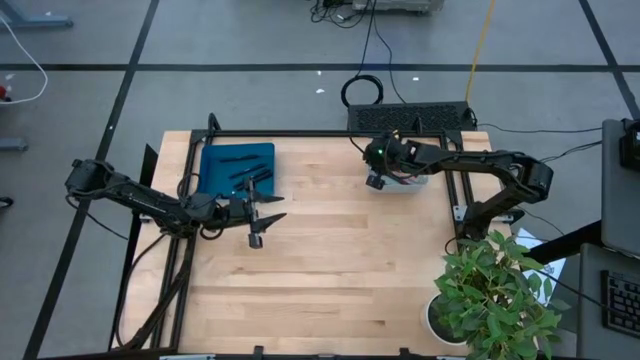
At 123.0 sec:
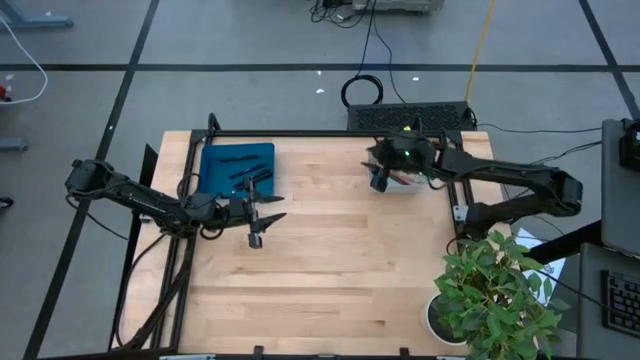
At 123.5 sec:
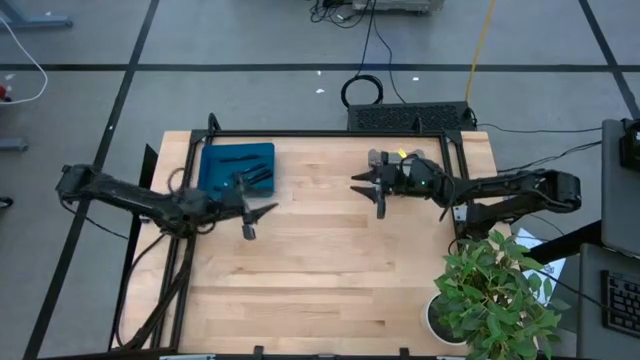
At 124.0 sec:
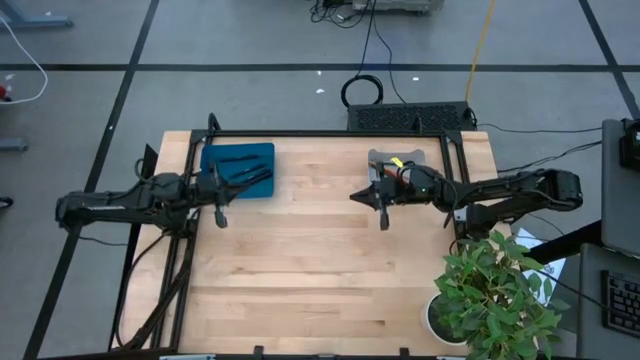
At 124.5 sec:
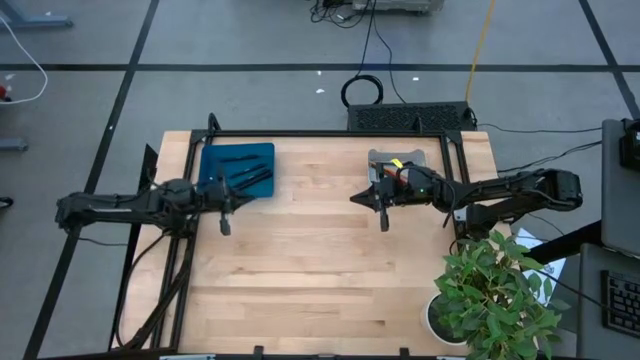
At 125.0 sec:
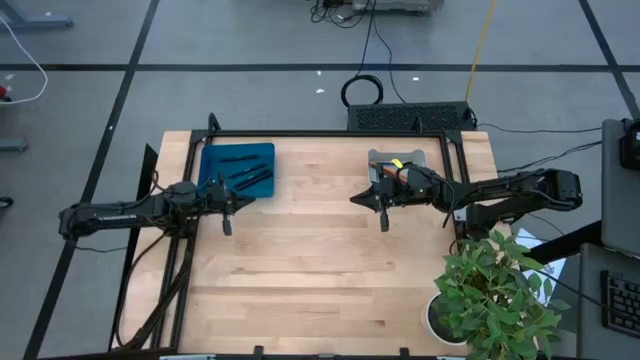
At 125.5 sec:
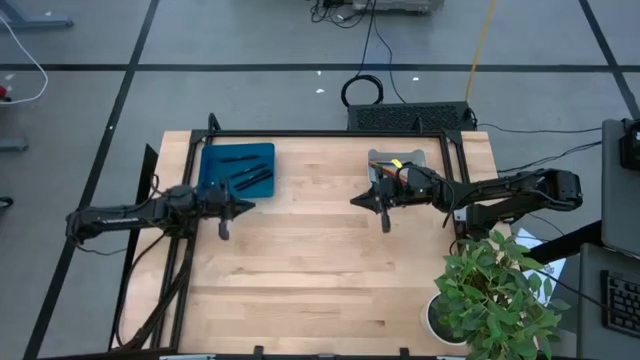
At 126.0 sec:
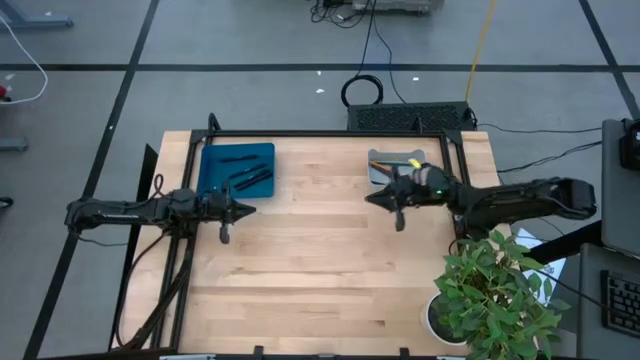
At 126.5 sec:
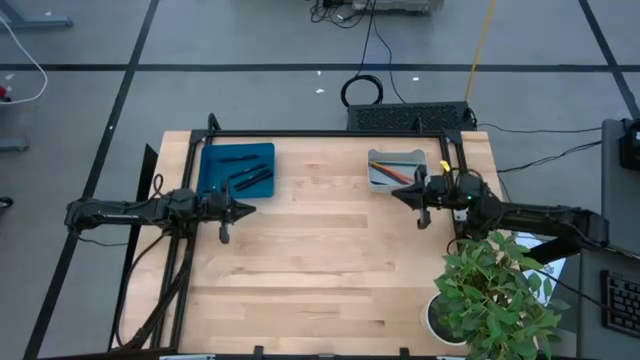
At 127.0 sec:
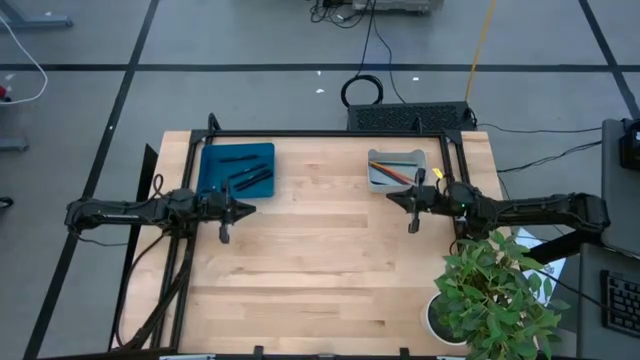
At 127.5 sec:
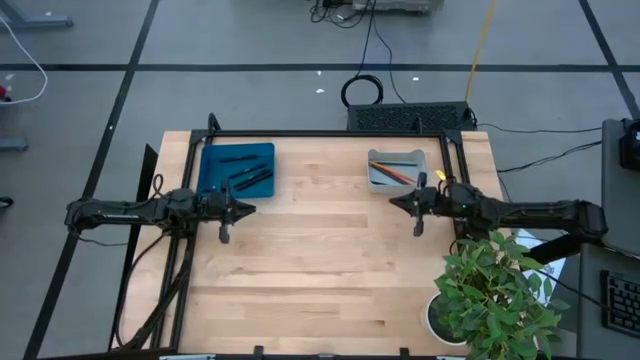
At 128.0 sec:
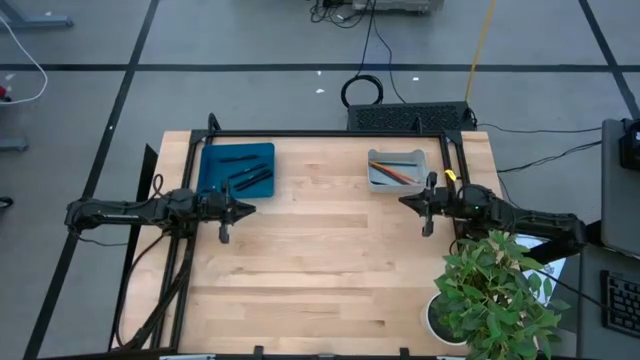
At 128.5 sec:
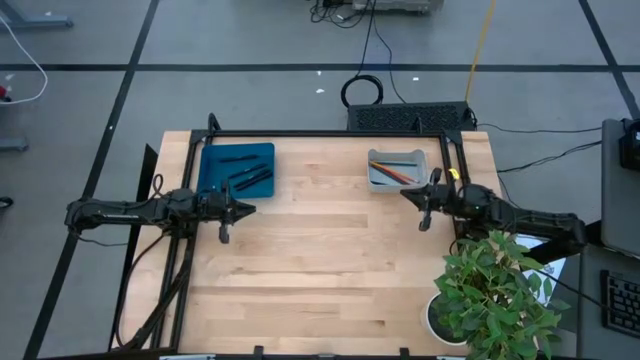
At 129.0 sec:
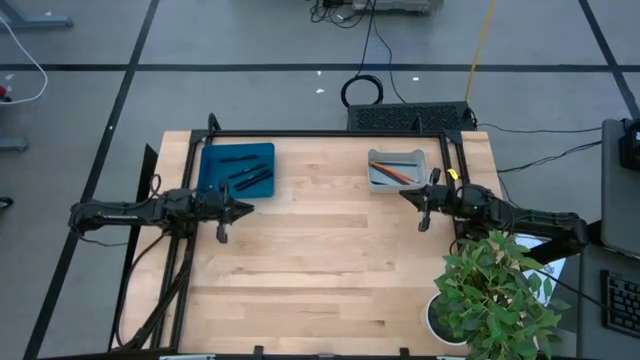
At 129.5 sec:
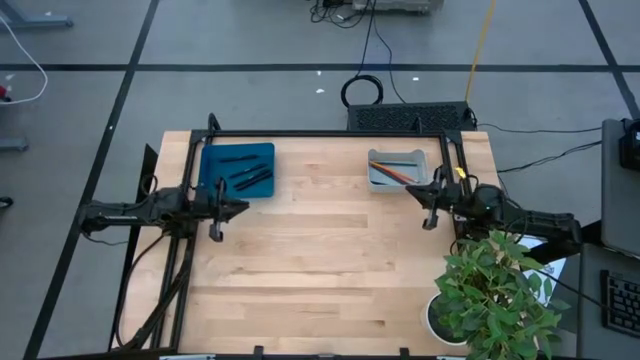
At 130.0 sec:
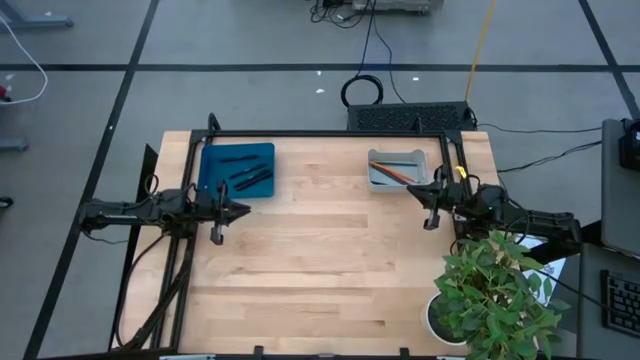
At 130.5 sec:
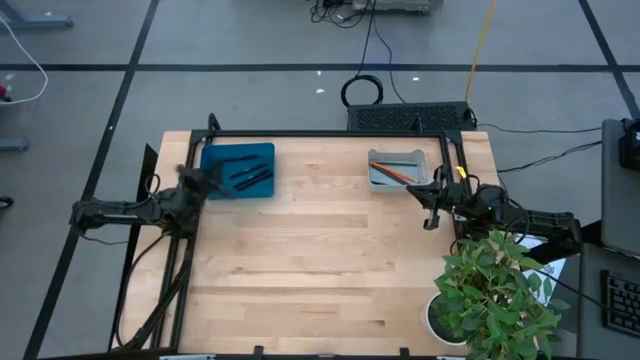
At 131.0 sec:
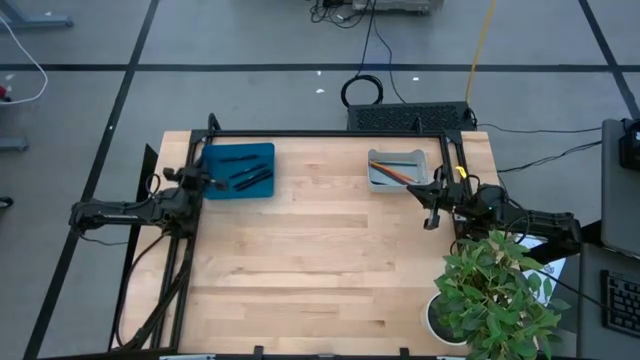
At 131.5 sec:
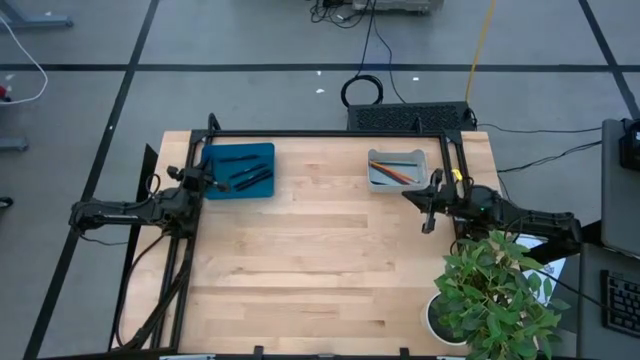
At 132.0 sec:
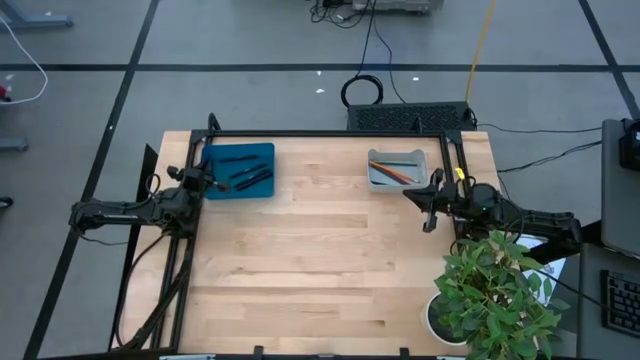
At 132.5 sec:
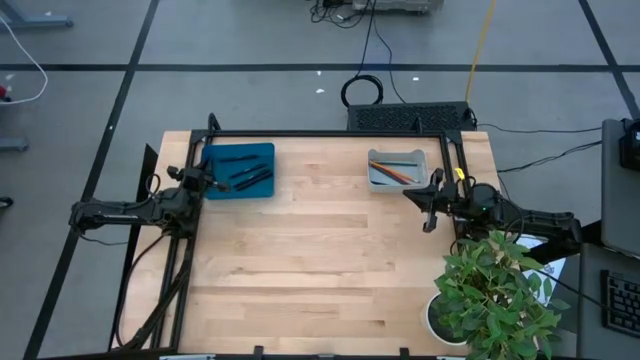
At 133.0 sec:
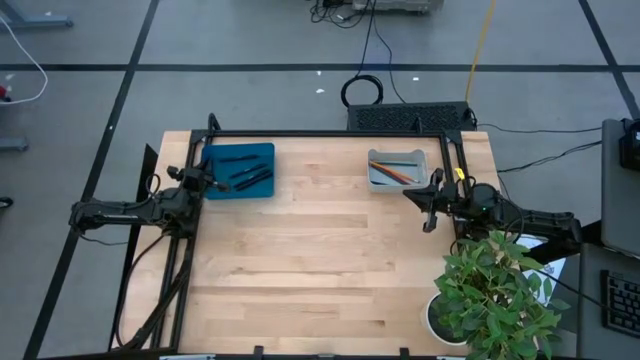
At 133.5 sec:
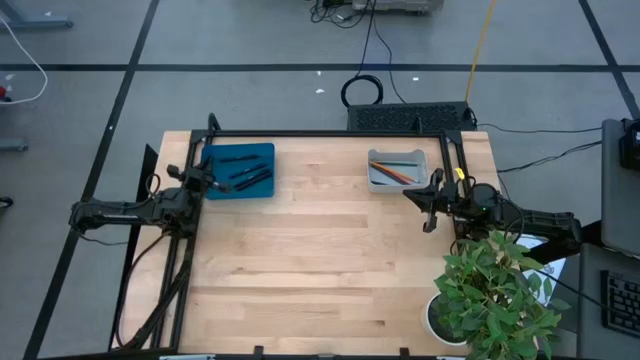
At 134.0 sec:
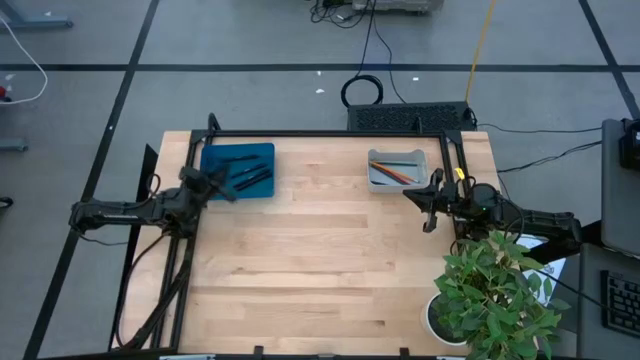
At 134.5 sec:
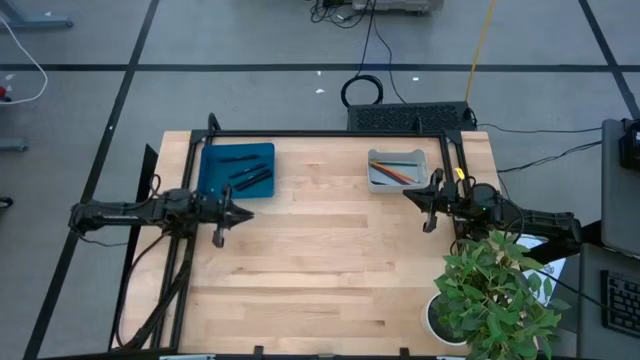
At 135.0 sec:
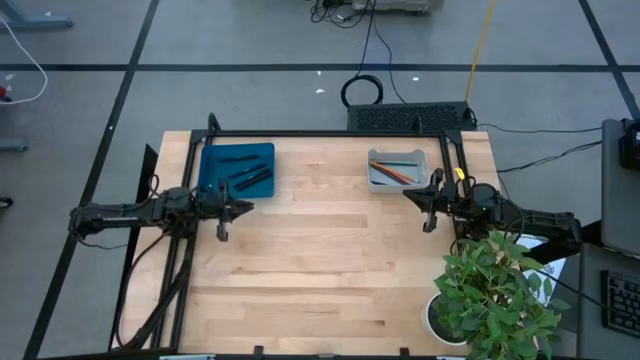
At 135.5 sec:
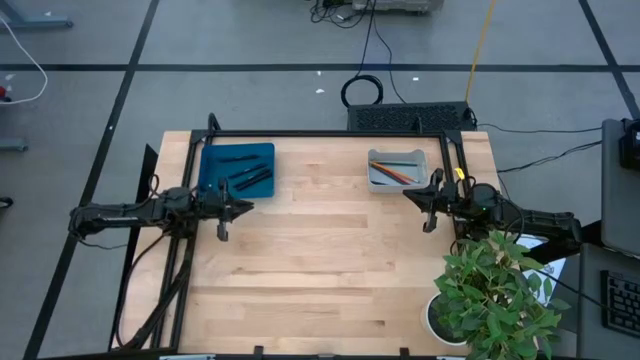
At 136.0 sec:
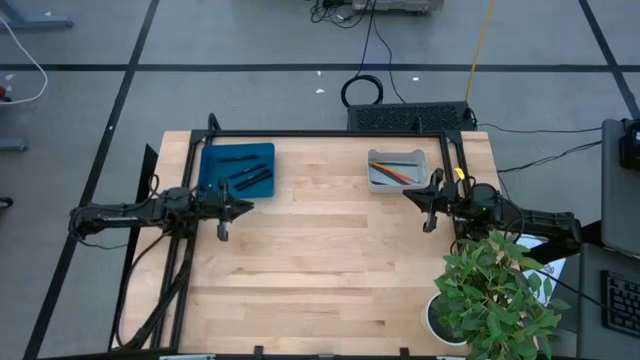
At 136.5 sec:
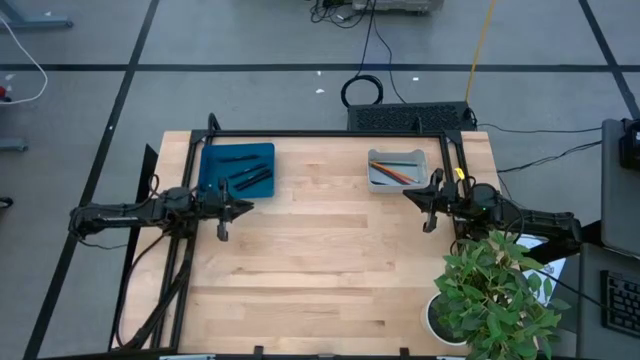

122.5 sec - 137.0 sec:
Task: Sort pens & pencils
Return to Home Position

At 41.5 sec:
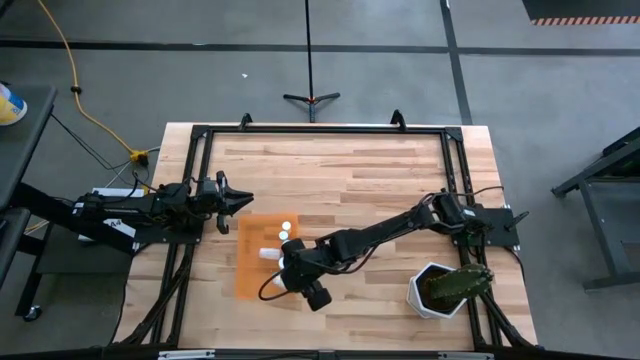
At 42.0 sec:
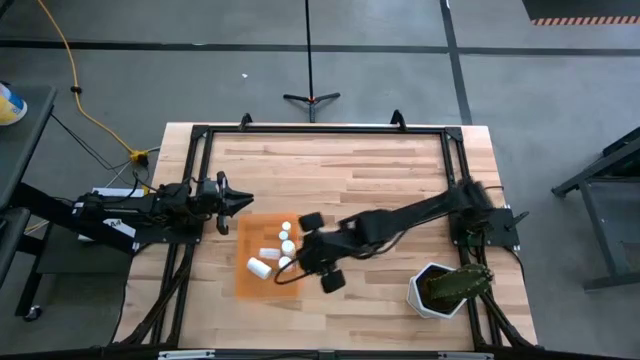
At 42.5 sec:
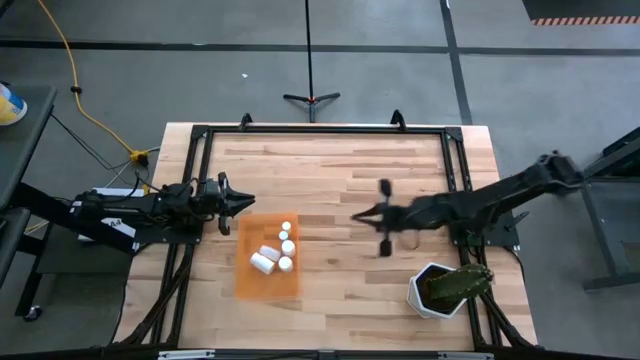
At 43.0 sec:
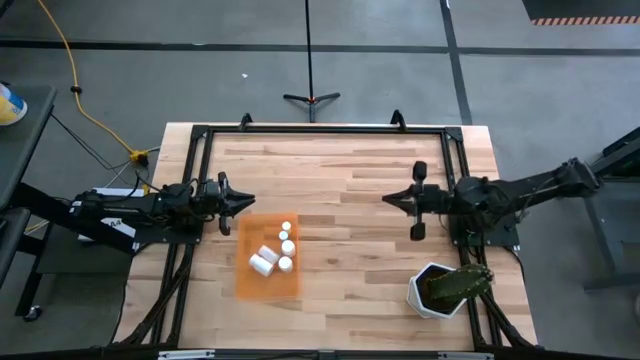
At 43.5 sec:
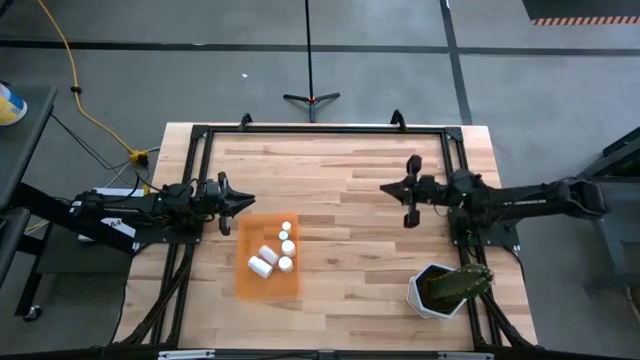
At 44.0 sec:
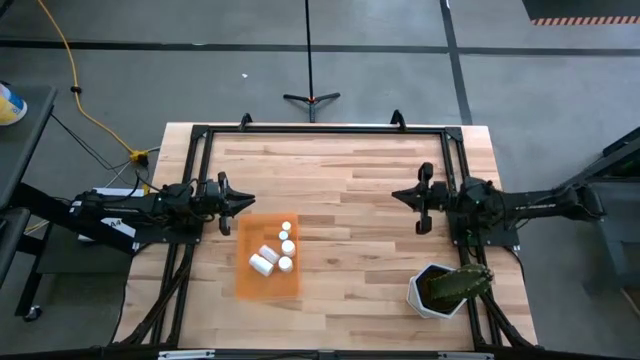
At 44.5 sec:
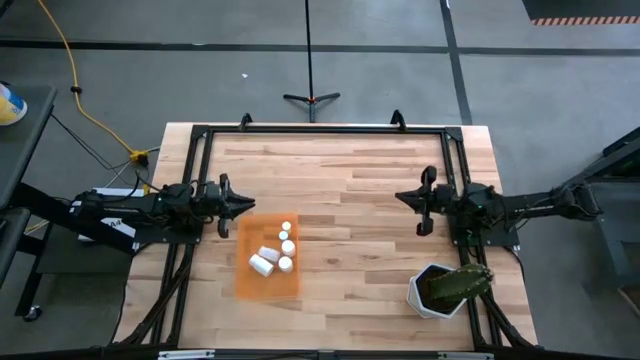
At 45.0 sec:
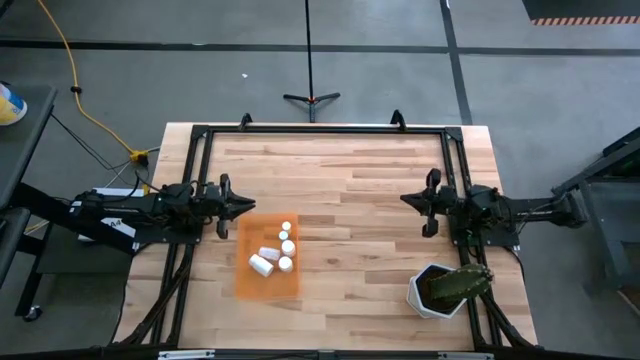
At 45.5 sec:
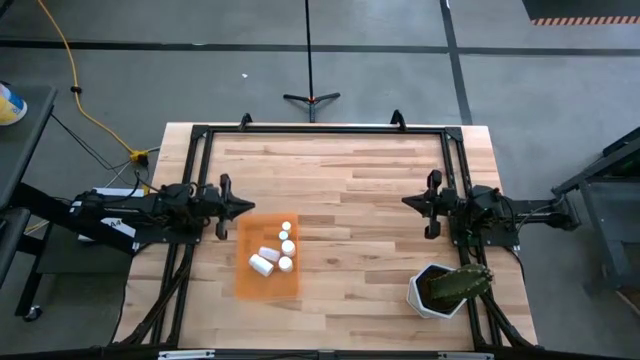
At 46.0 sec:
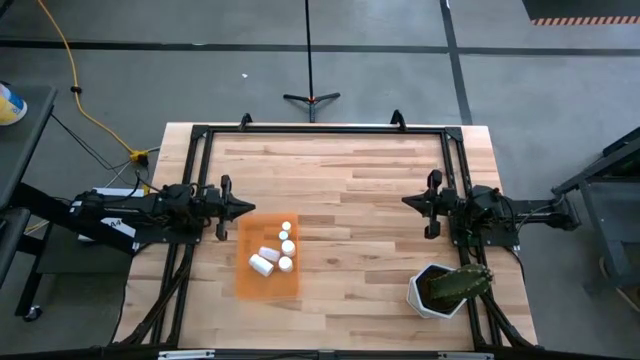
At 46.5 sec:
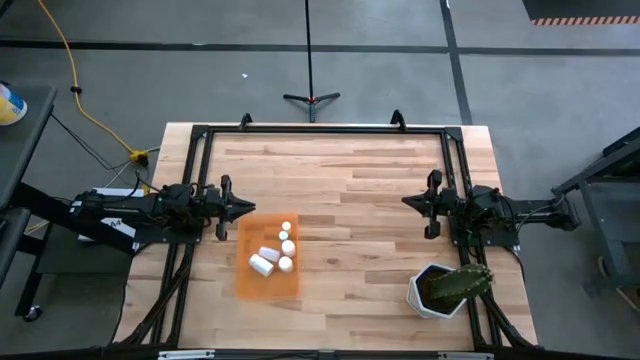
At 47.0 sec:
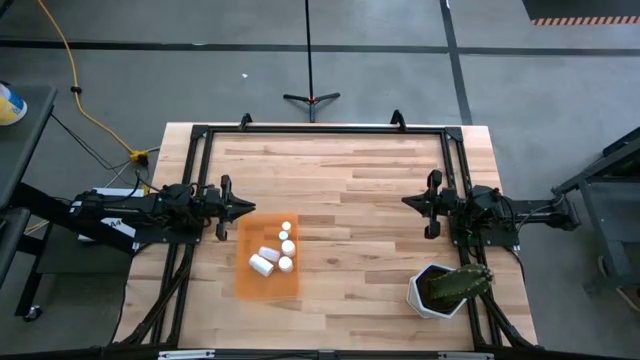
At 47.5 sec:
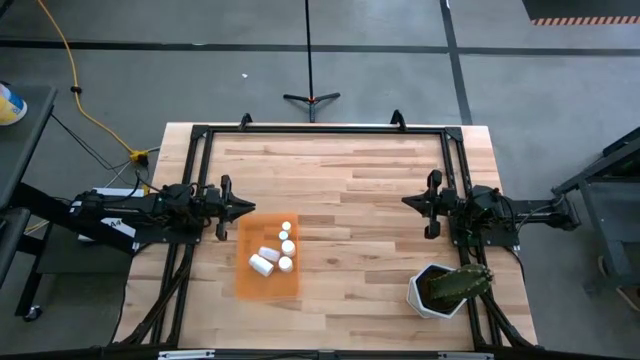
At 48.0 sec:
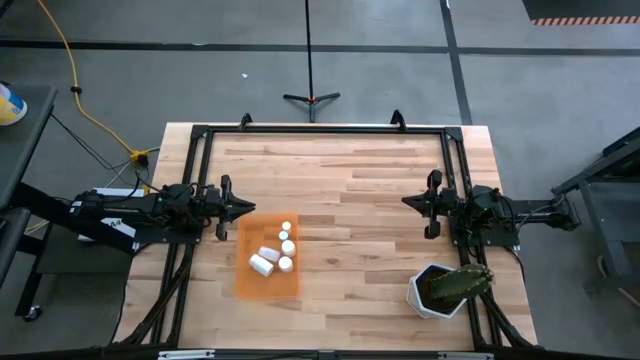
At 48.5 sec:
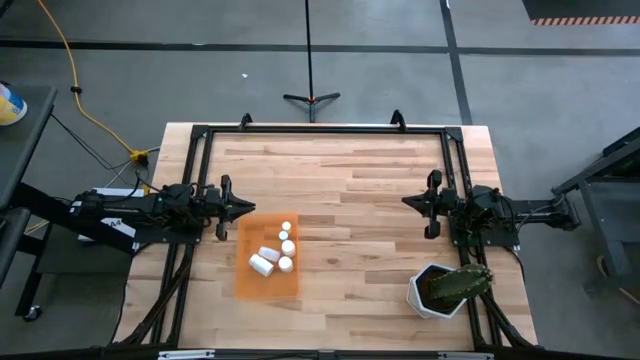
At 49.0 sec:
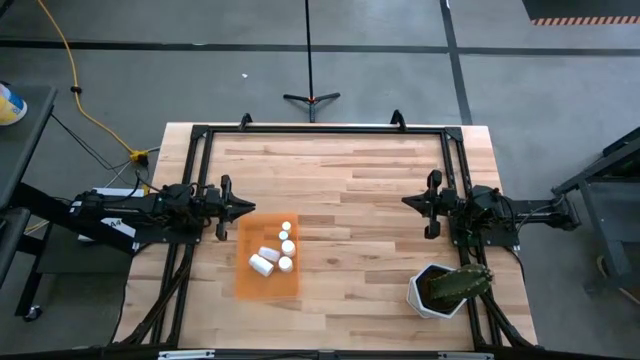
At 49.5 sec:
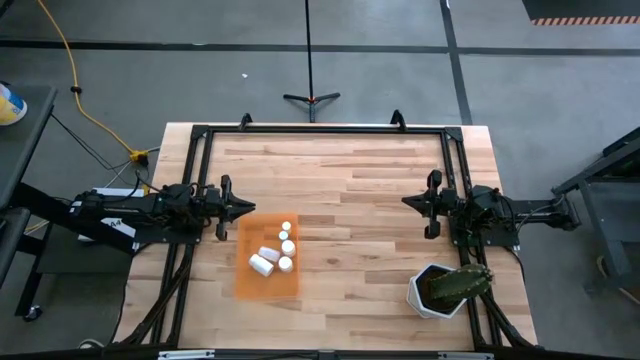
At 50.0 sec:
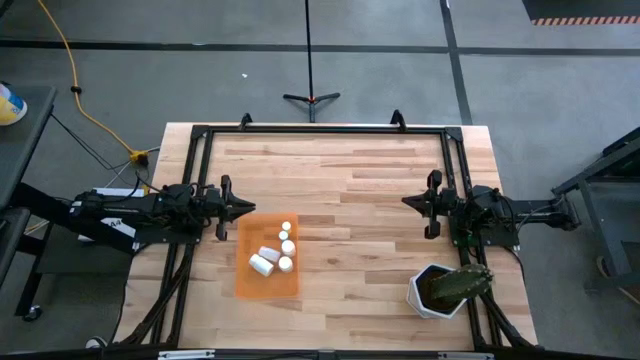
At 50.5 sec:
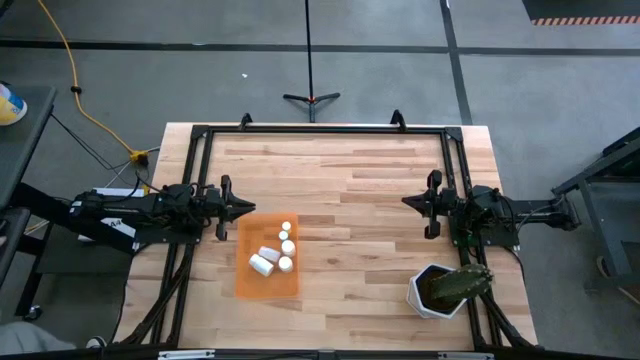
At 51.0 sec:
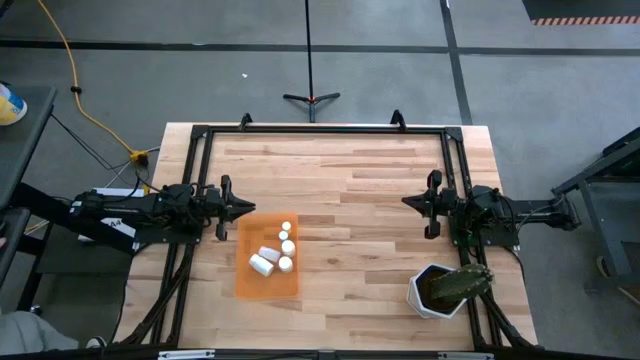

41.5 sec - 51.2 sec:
Task: Pick and place pill bottles into a basket
Return to Home Position
